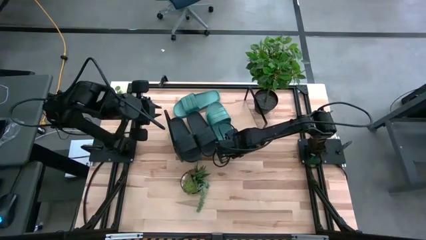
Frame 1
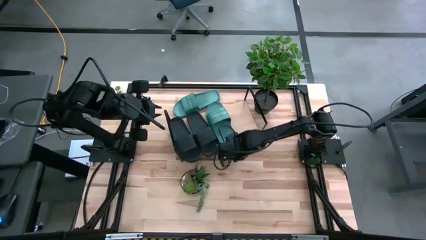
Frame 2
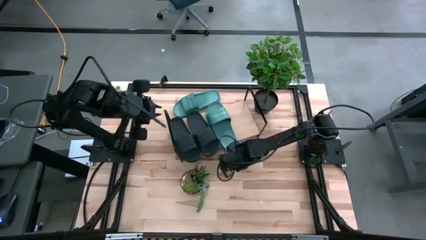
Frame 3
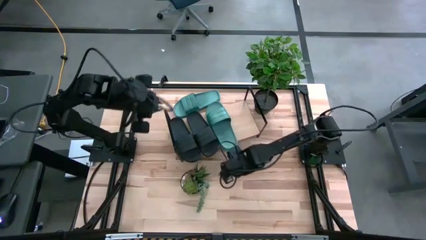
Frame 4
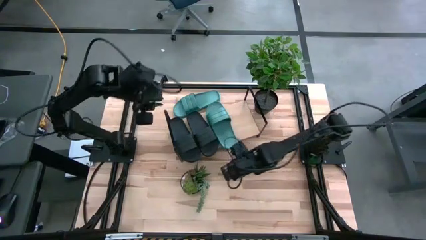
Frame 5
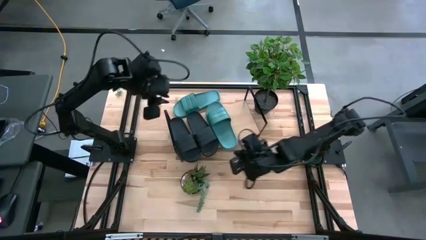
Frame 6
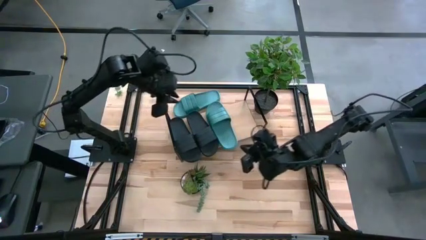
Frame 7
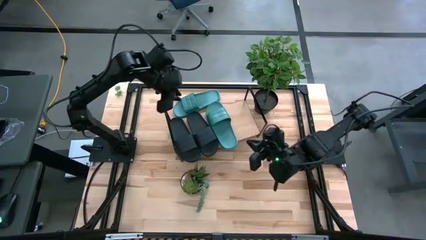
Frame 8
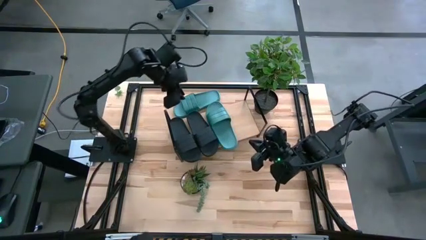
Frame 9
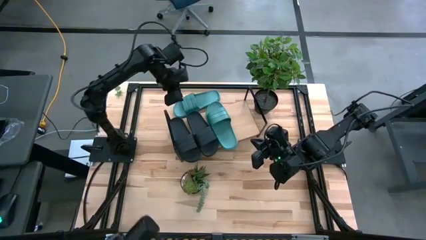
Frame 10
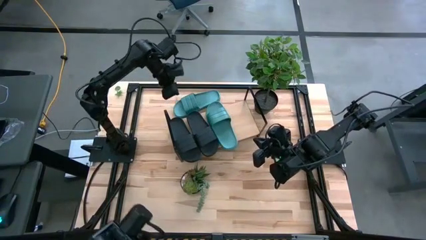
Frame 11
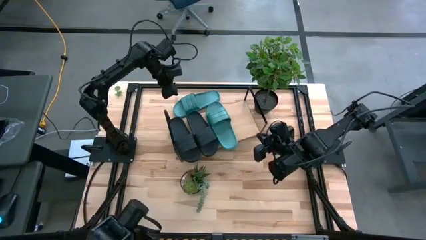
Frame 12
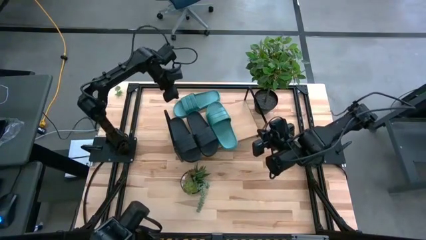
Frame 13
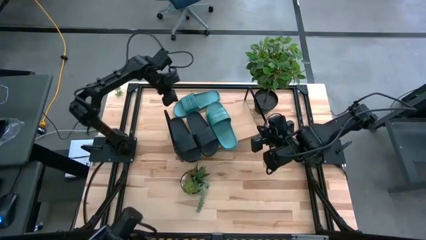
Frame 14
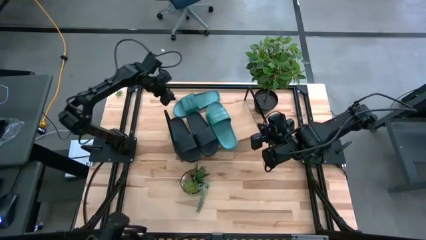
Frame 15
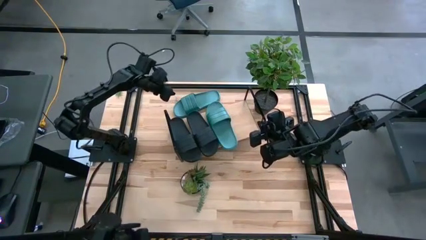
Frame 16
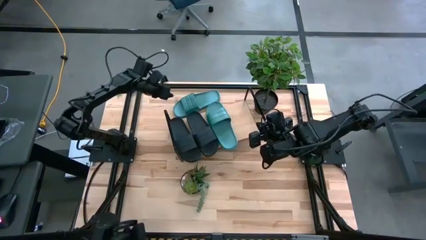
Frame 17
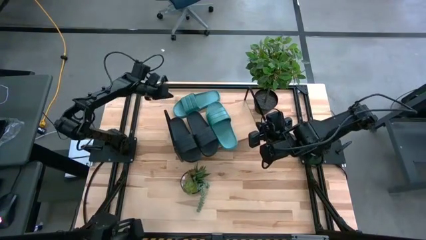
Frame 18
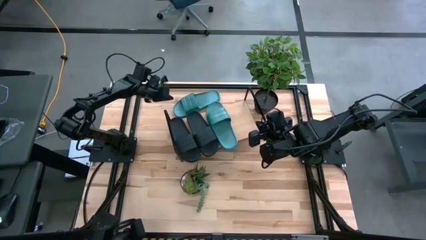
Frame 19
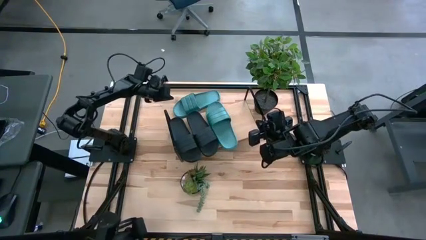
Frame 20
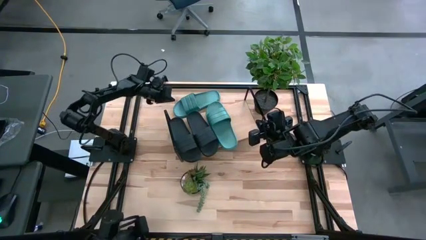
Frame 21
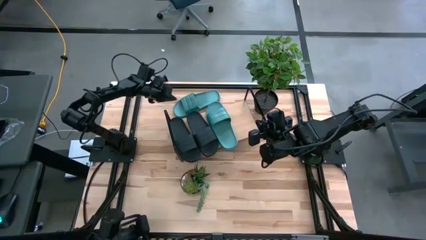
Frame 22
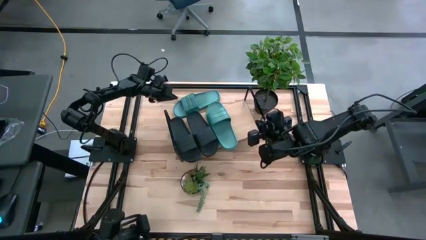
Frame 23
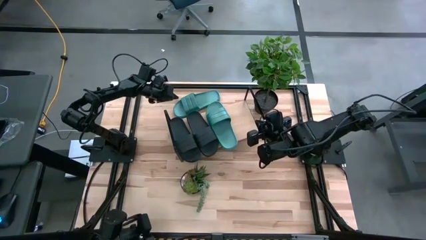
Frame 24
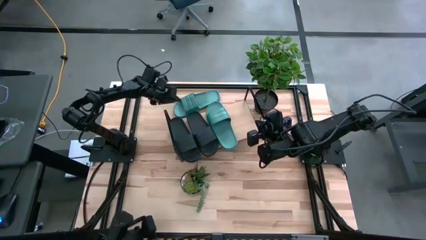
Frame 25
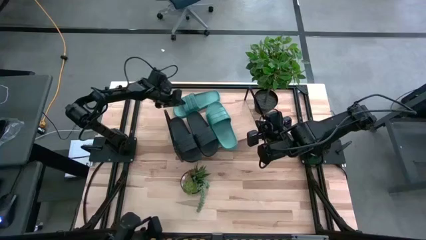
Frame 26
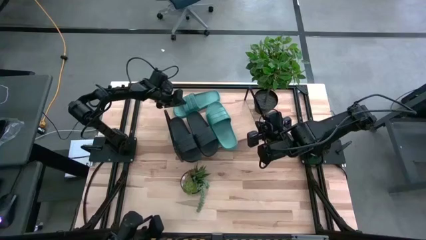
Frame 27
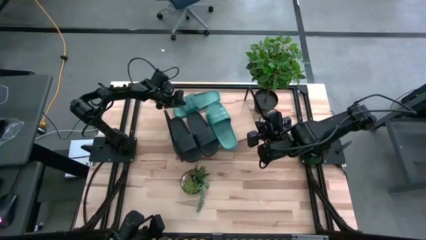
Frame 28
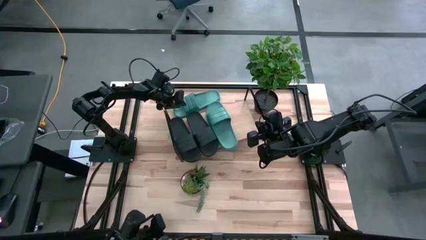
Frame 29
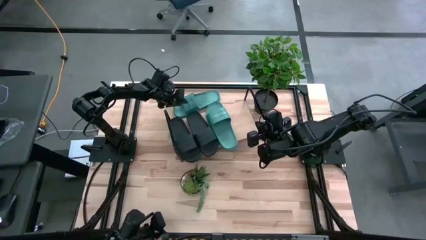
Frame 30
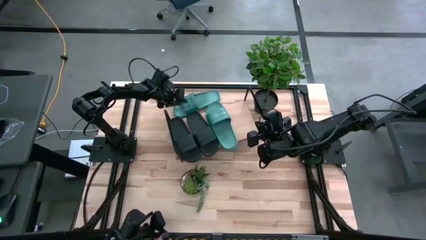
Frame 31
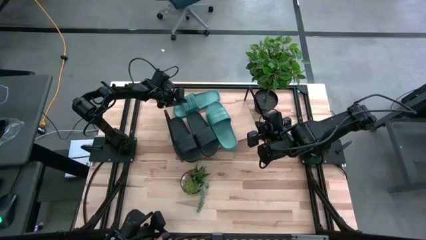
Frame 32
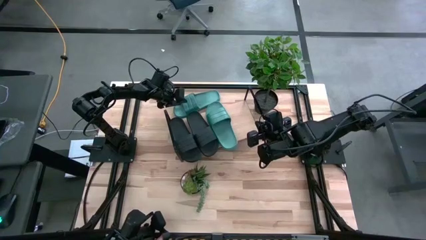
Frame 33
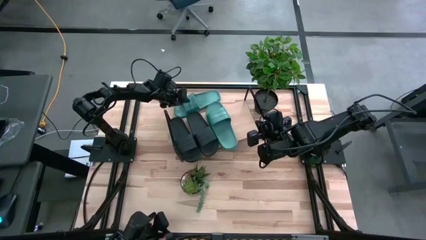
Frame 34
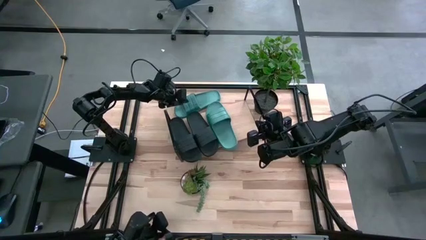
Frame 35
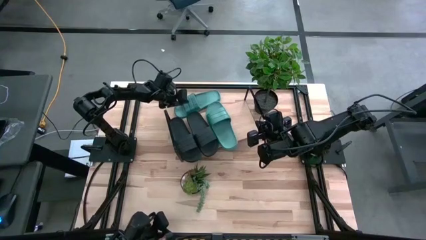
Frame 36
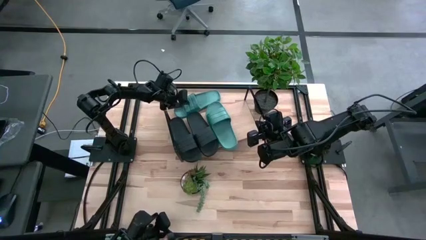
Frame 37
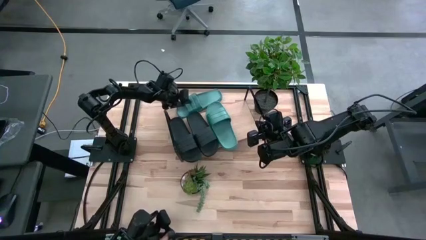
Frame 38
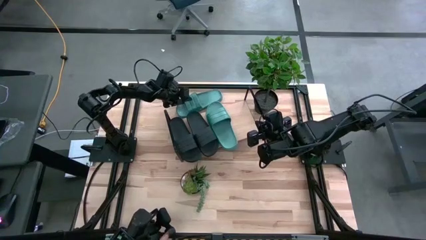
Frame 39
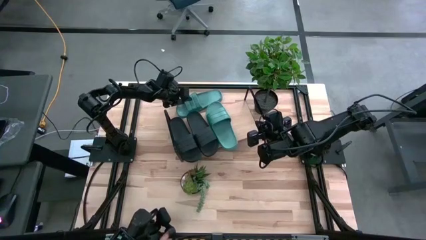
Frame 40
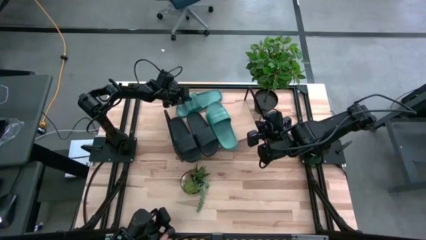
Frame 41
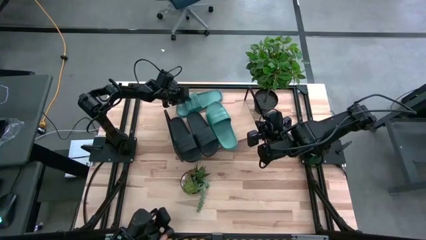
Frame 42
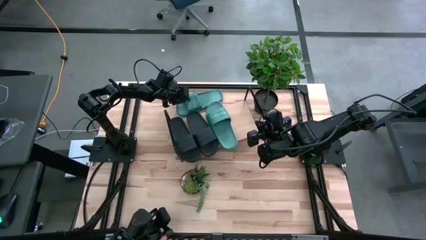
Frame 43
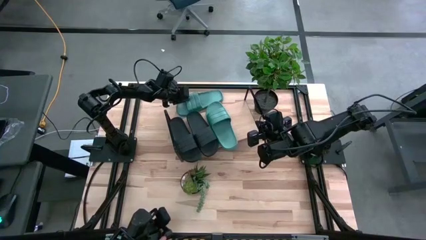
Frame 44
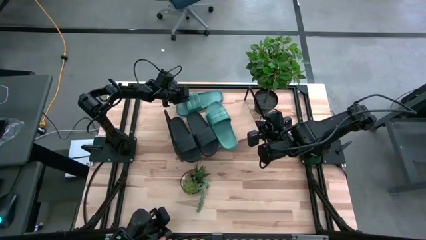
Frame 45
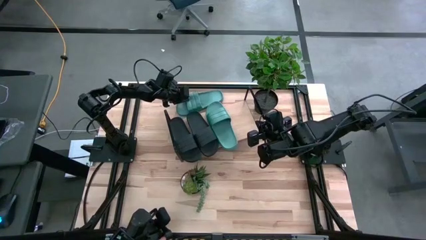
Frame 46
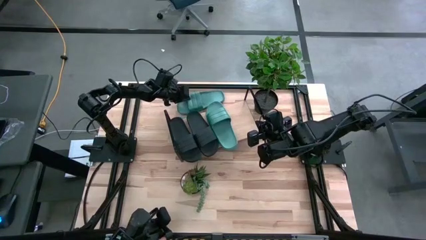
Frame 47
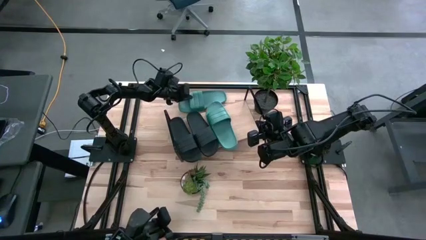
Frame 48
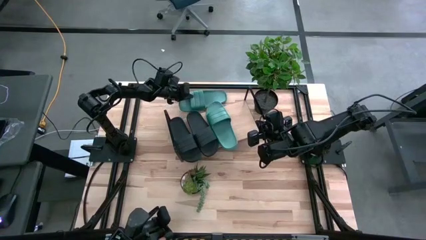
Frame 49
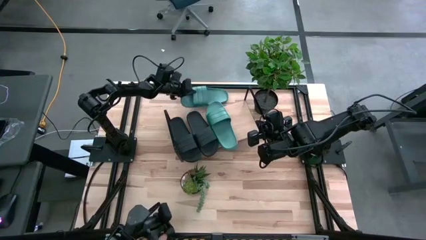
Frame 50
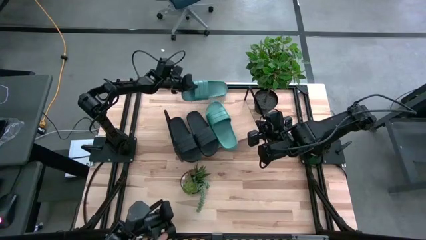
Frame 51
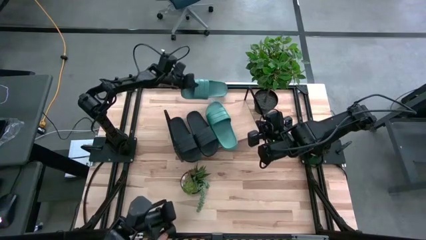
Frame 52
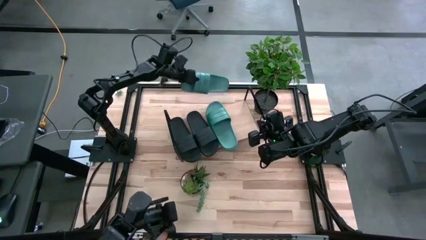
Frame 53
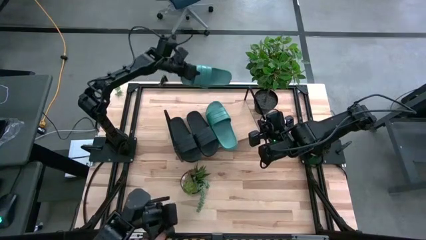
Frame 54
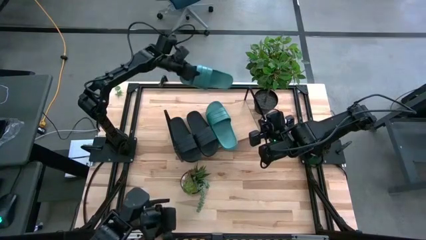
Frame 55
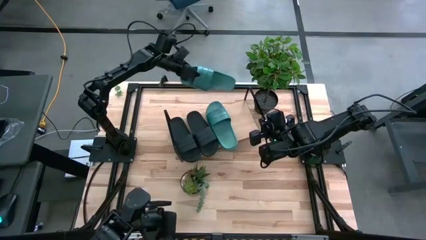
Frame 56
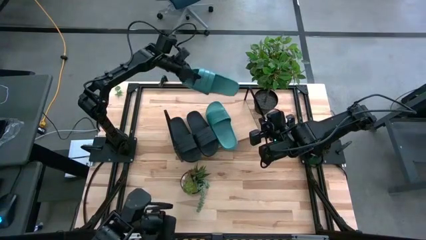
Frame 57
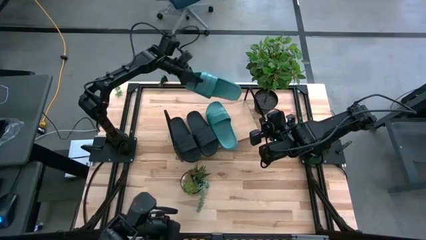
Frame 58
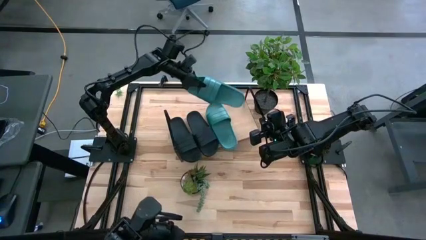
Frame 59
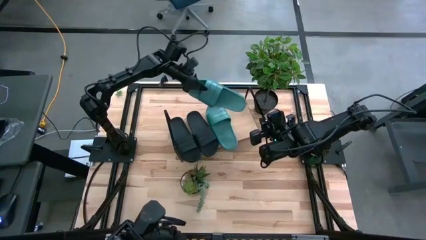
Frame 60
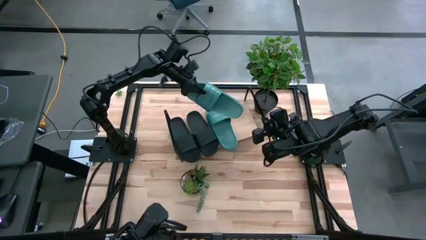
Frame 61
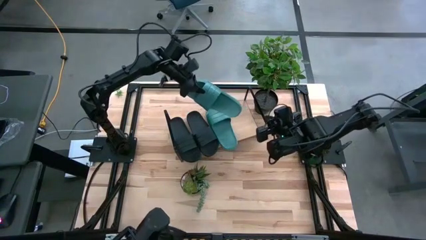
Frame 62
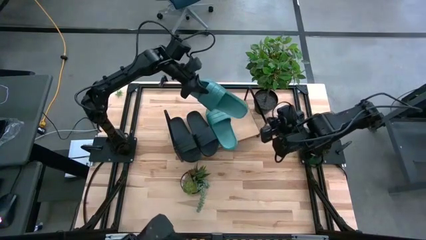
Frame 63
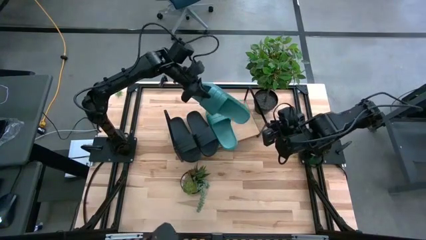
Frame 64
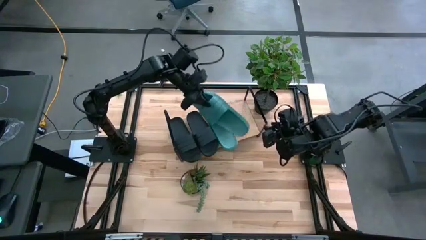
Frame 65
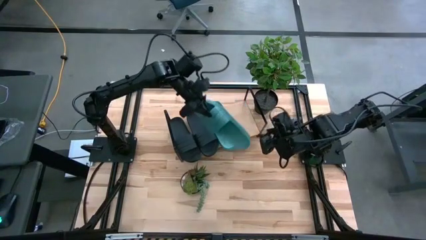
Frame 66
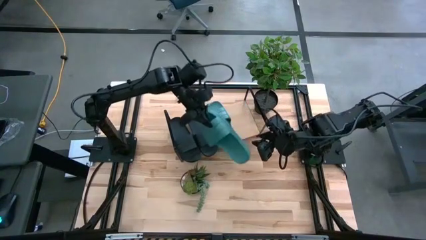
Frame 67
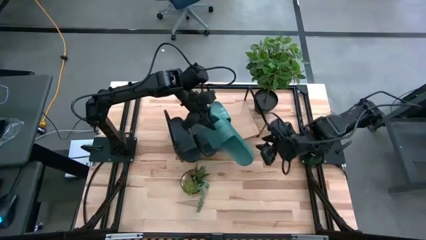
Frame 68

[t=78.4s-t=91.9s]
Task: Pick and place slides into the shelf
Put the blue slipper on the shelf

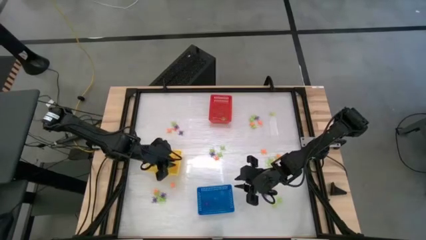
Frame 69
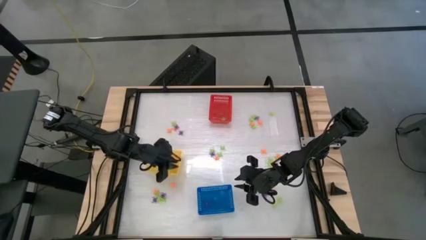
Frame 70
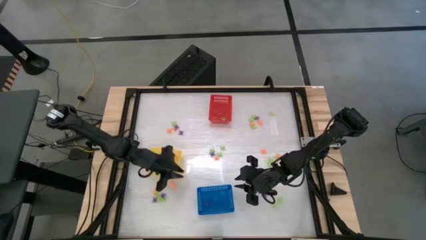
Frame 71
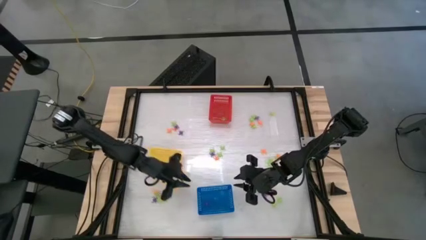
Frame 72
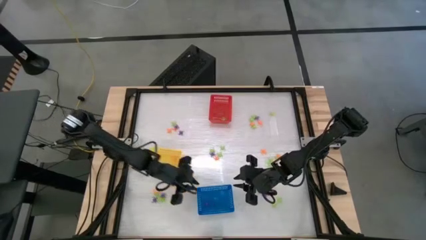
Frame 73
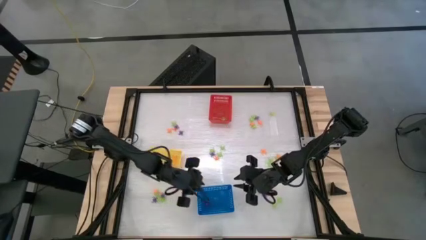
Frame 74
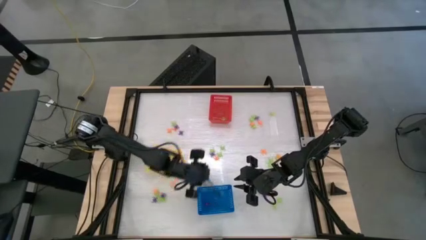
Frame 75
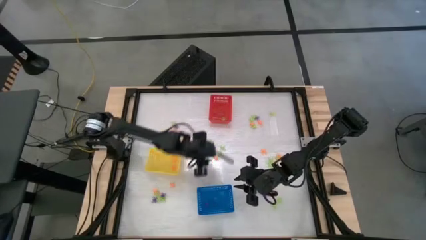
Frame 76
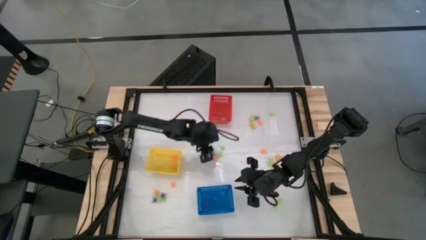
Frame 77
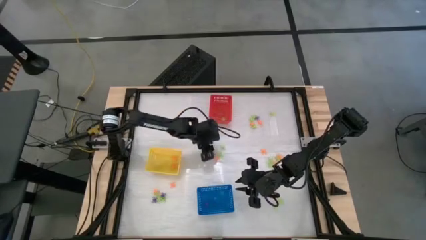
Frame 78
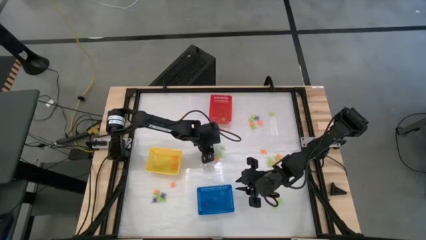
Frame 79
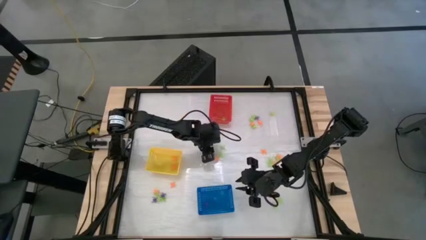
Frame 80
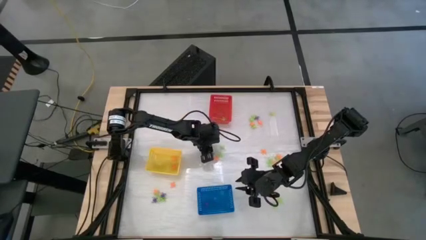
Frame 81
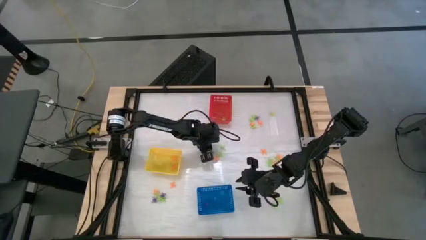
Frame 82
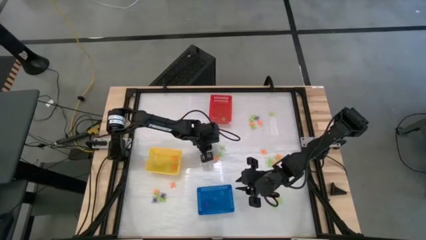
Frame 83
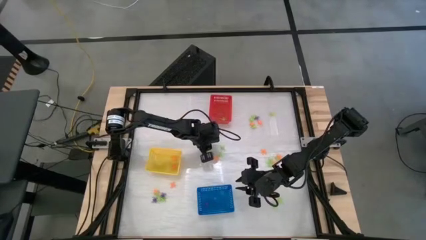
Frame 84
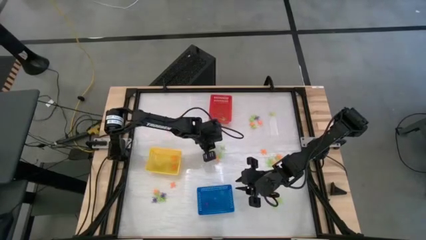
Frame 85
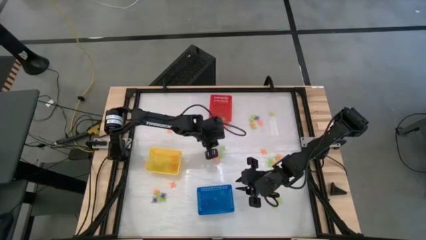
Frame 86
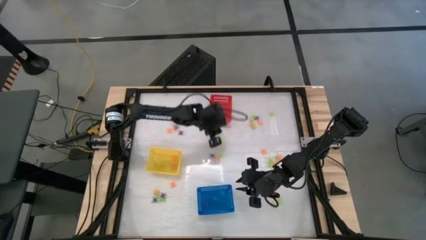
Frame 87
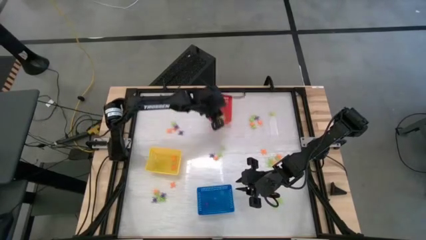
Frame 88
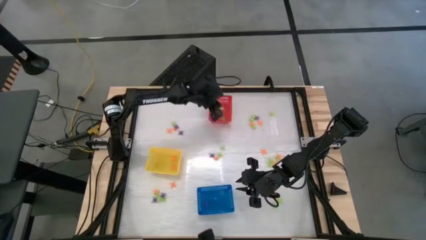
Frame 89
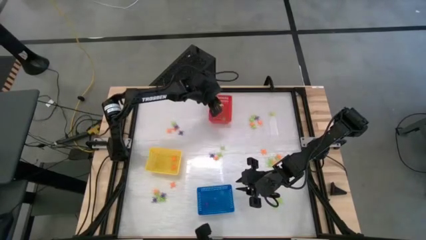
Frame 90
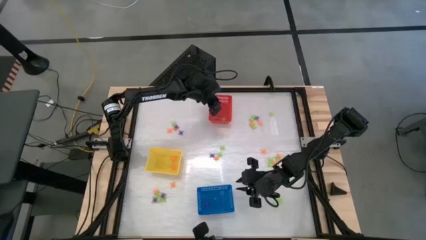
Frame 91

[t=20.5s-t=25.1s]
Task: Sort Halloween decoration
Put the green spider toy into the red basket
